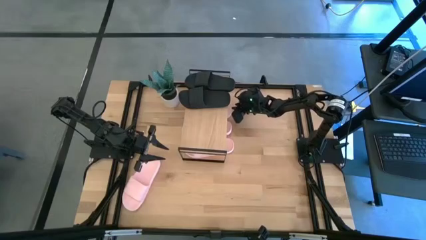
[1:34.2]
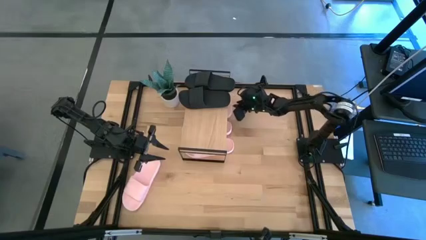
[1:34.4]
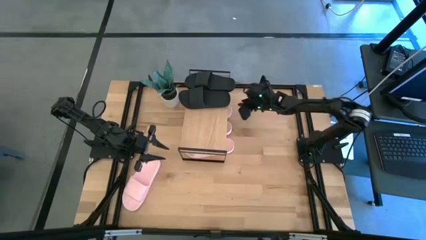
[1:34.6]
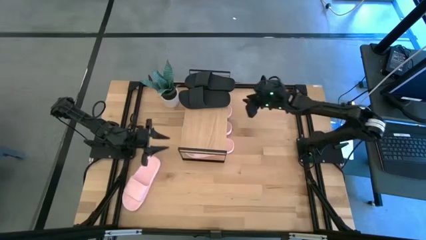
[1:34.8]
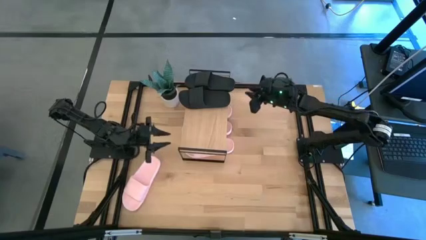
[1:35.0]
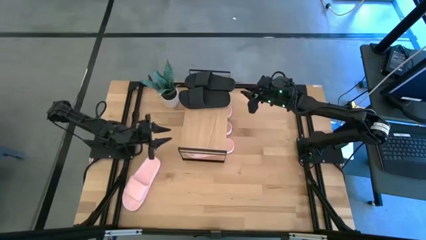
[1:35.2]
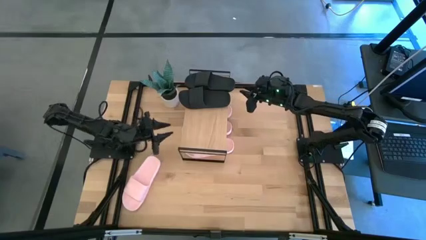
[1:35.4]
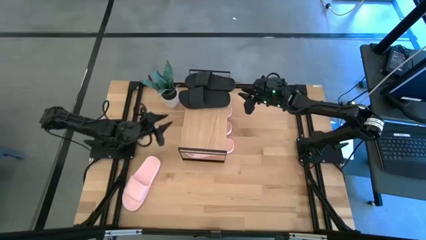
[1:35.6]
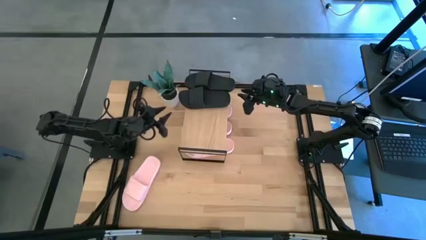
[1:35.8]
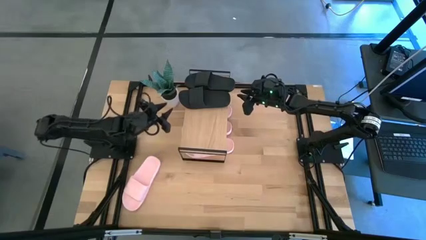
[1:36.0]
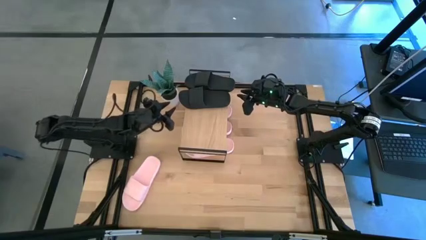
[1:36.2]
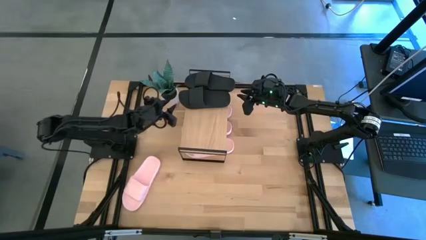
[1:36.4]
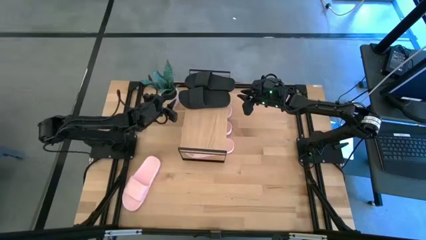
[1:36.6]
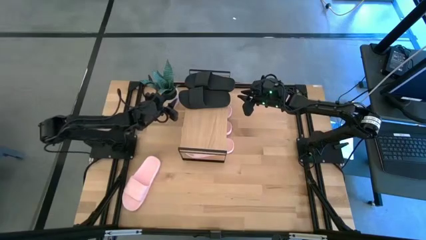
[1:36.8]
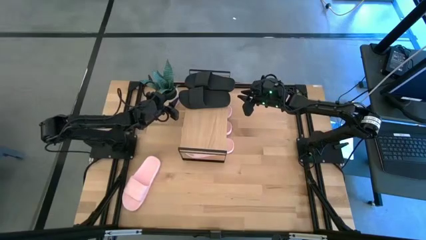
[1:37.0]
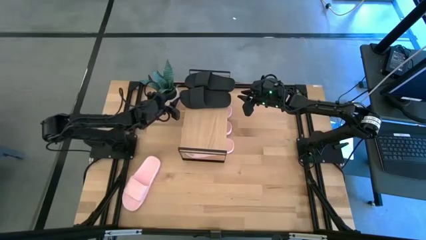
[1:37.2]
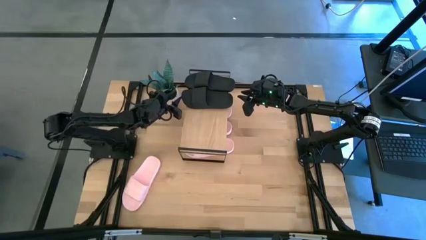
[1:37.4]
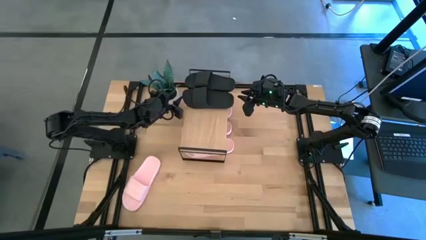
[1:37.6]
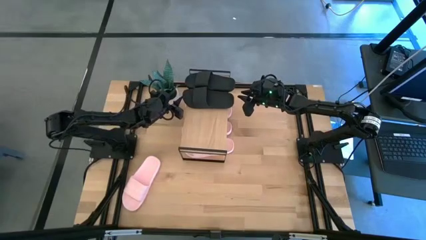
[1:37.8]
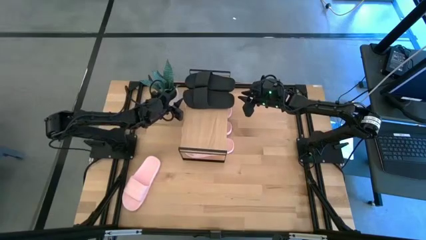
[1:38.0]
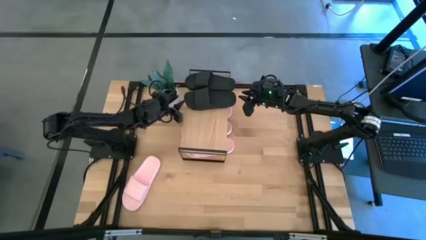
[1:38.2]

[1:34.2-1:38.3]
Task: Pick and place slides into the shelf
Adjust the black slide on the shelf

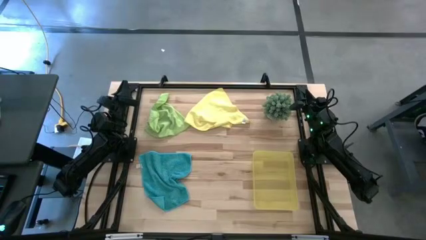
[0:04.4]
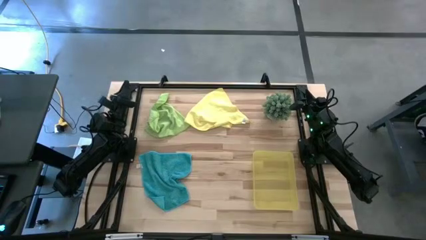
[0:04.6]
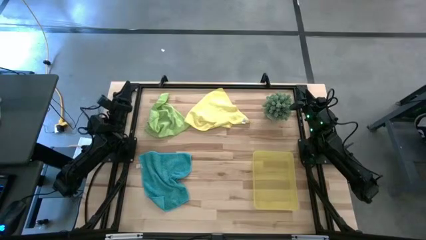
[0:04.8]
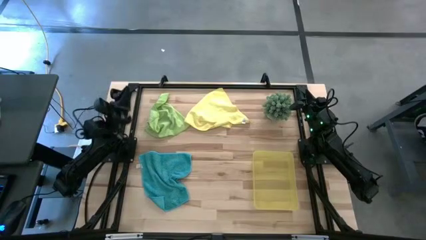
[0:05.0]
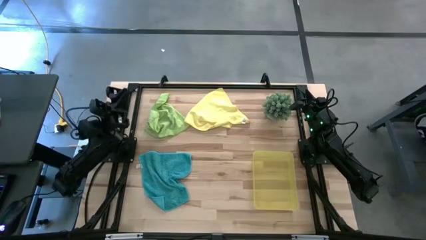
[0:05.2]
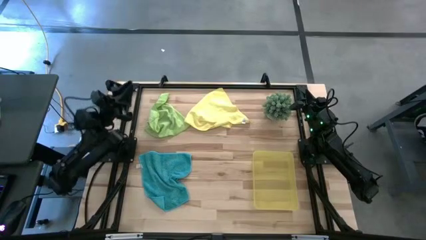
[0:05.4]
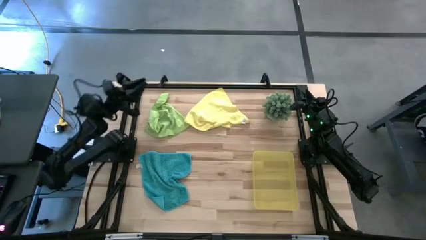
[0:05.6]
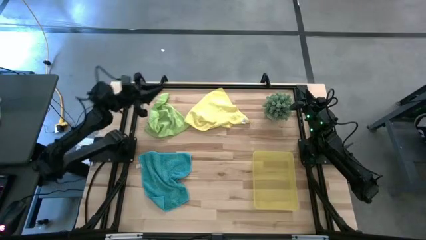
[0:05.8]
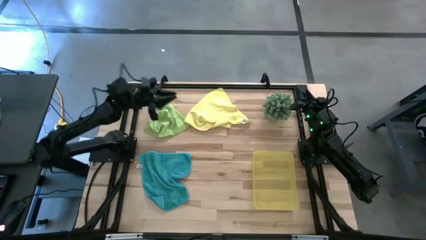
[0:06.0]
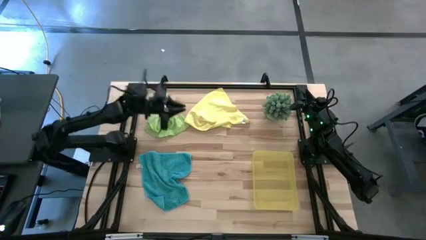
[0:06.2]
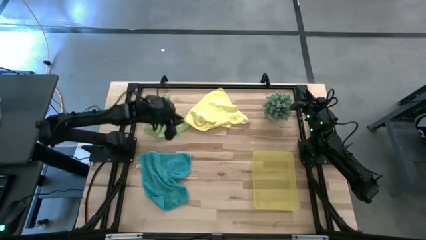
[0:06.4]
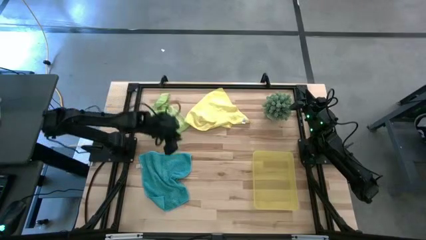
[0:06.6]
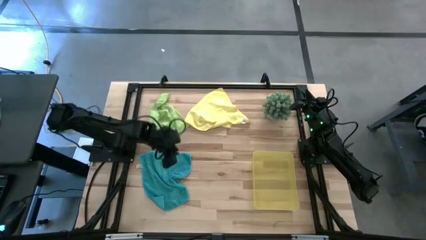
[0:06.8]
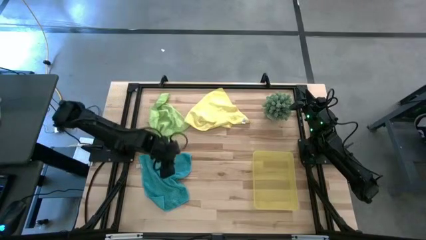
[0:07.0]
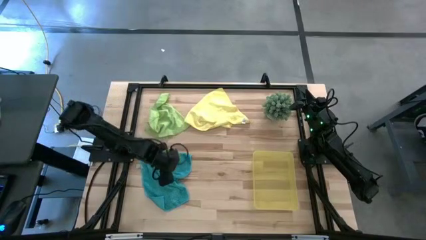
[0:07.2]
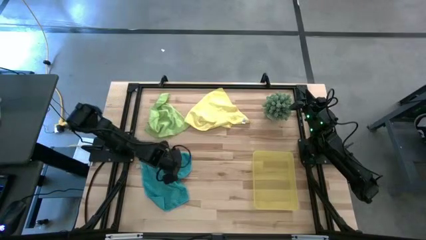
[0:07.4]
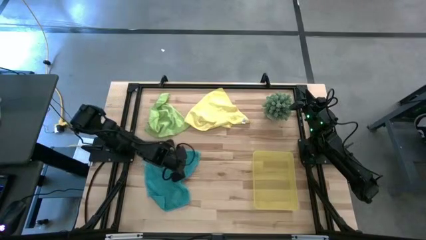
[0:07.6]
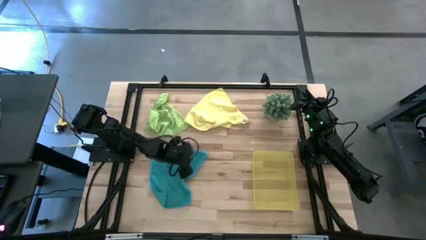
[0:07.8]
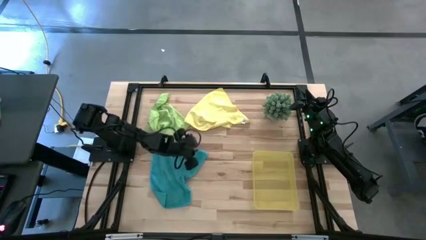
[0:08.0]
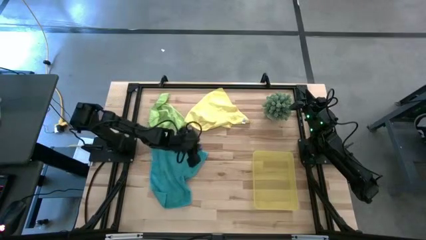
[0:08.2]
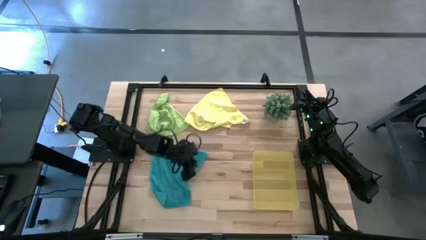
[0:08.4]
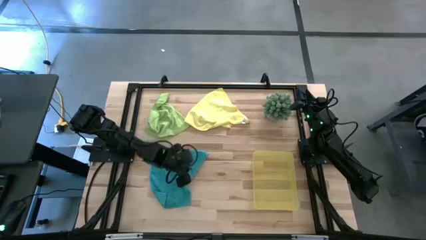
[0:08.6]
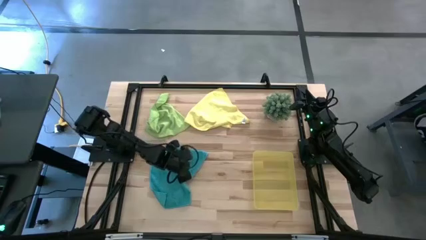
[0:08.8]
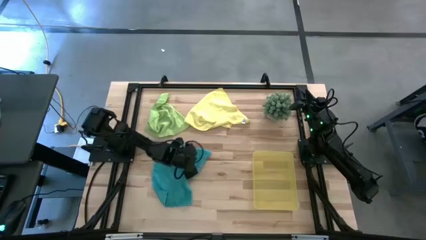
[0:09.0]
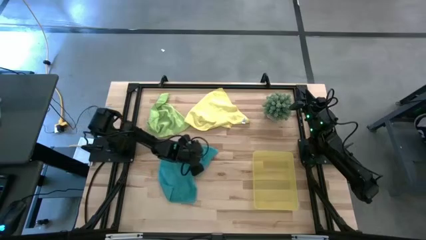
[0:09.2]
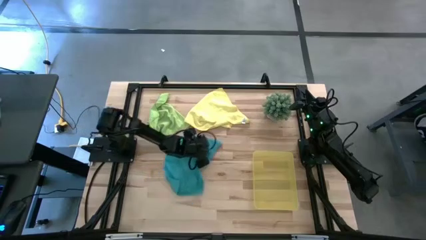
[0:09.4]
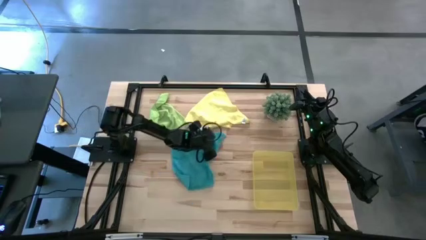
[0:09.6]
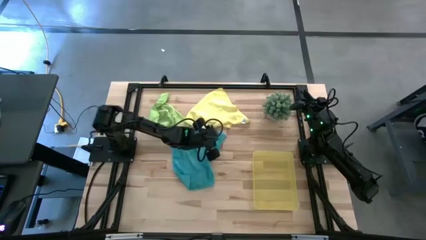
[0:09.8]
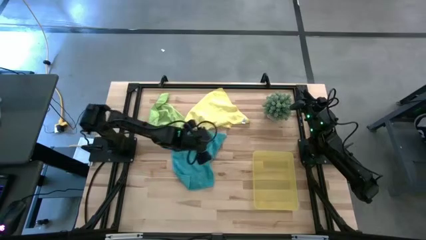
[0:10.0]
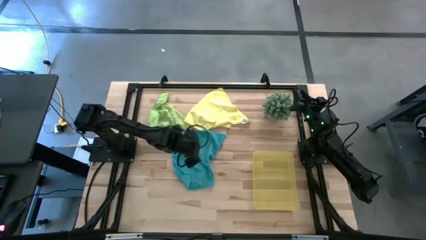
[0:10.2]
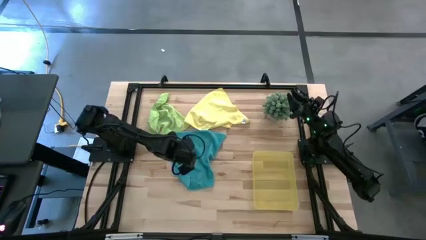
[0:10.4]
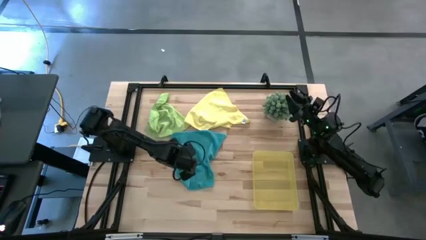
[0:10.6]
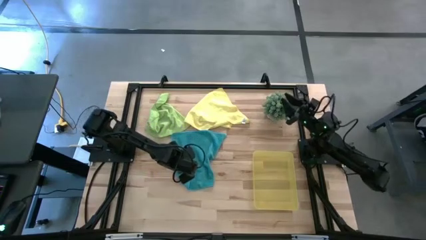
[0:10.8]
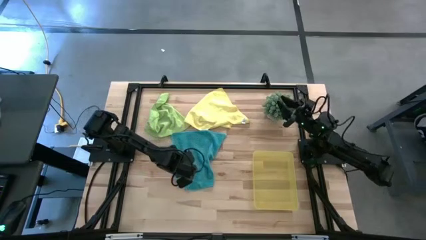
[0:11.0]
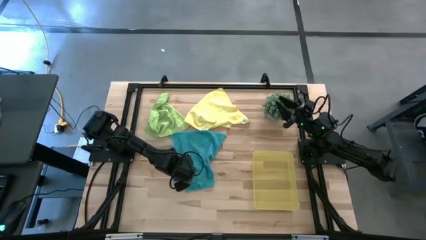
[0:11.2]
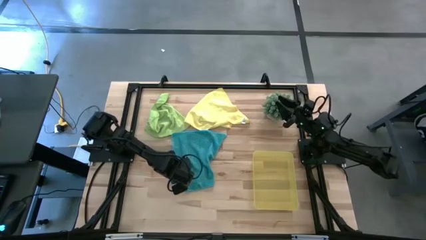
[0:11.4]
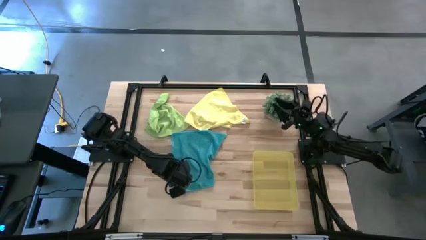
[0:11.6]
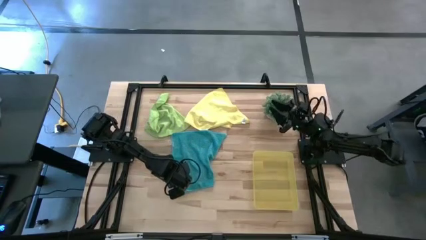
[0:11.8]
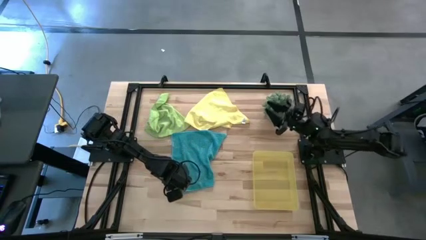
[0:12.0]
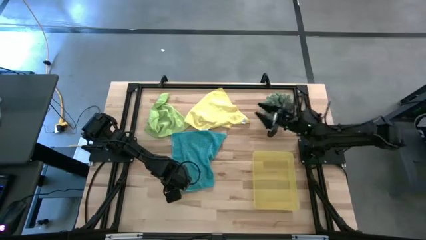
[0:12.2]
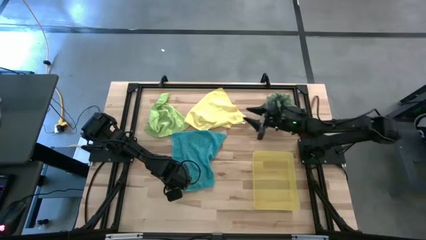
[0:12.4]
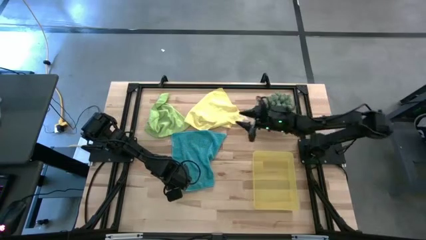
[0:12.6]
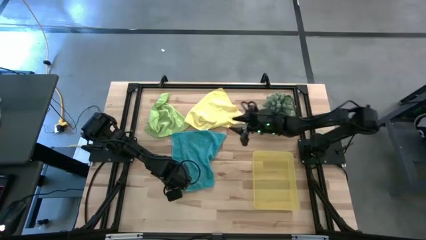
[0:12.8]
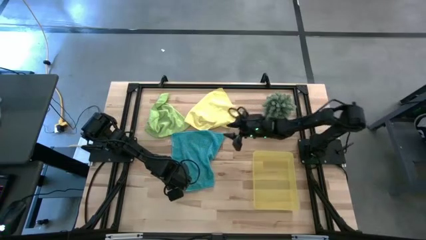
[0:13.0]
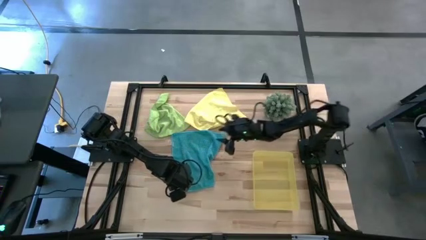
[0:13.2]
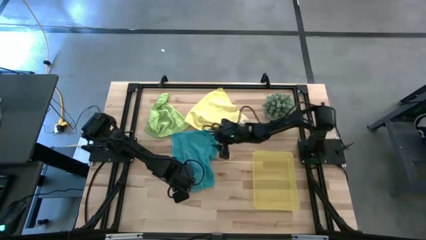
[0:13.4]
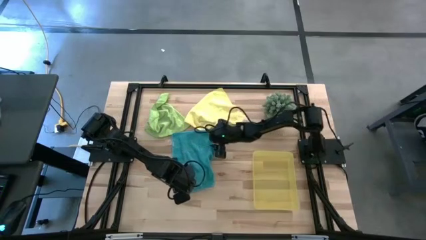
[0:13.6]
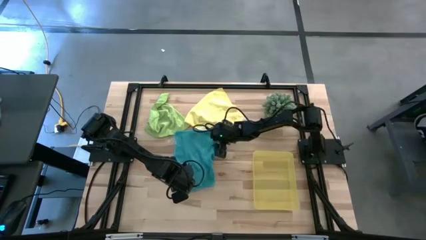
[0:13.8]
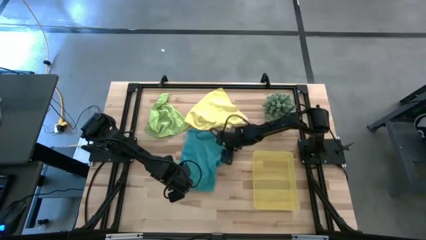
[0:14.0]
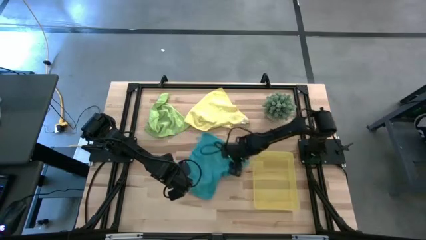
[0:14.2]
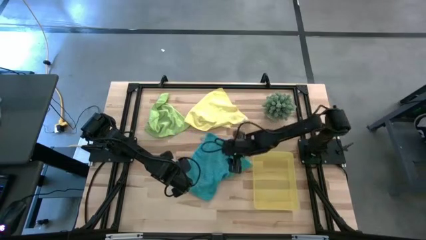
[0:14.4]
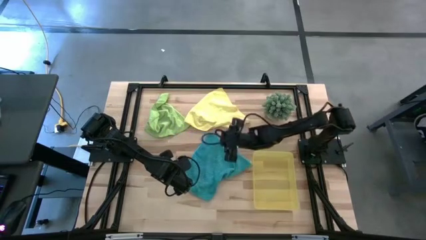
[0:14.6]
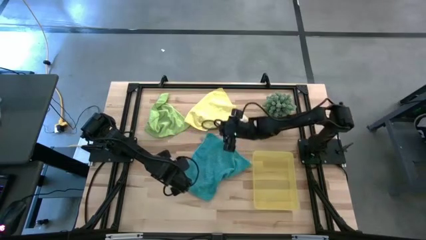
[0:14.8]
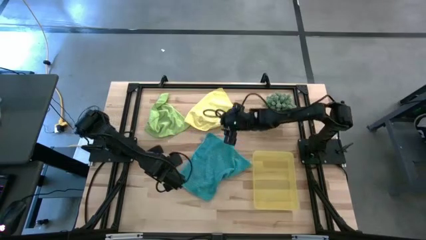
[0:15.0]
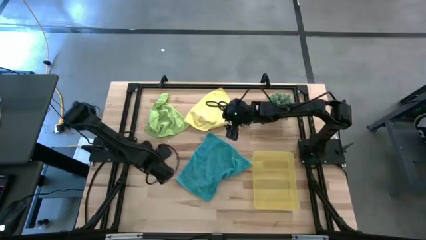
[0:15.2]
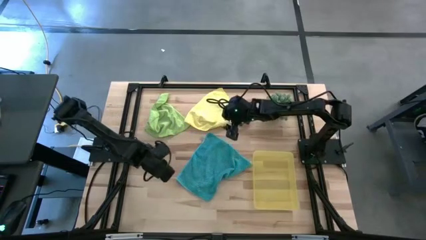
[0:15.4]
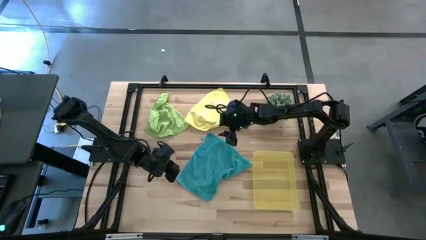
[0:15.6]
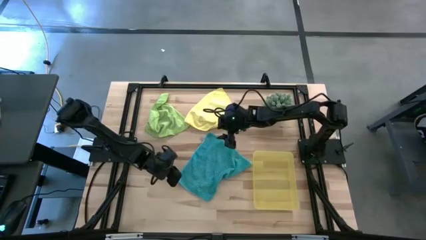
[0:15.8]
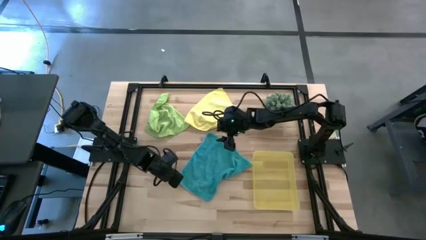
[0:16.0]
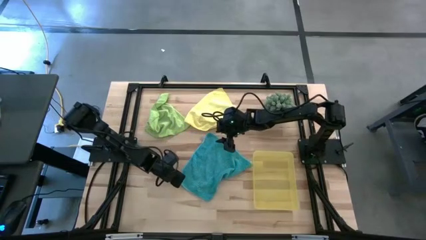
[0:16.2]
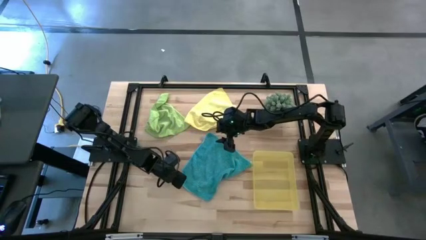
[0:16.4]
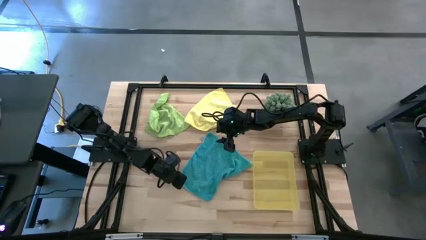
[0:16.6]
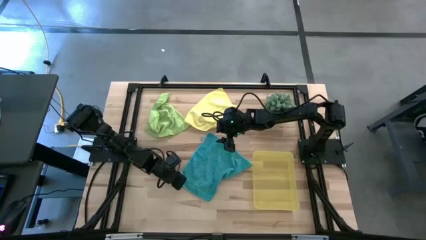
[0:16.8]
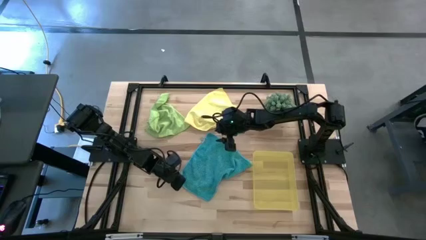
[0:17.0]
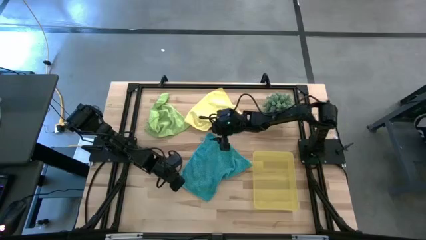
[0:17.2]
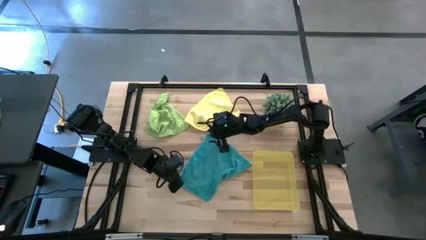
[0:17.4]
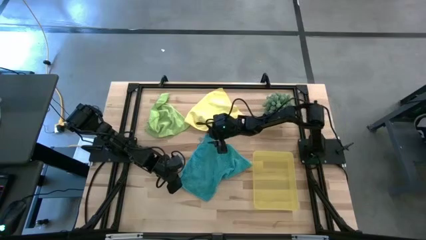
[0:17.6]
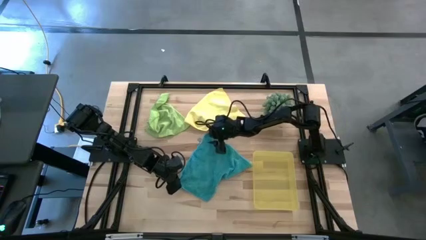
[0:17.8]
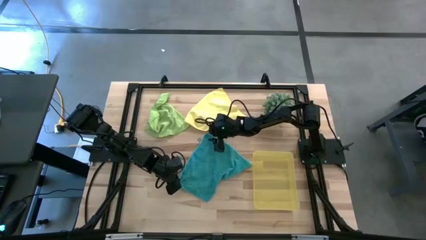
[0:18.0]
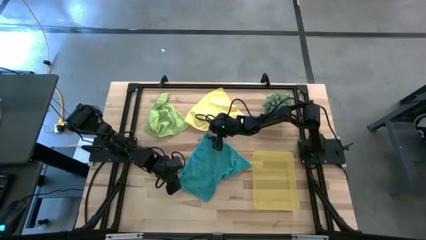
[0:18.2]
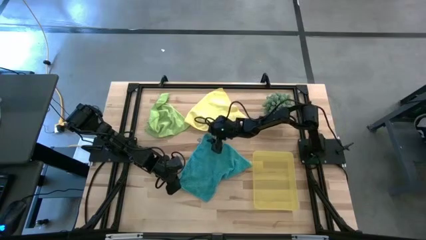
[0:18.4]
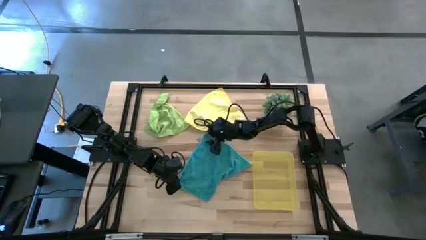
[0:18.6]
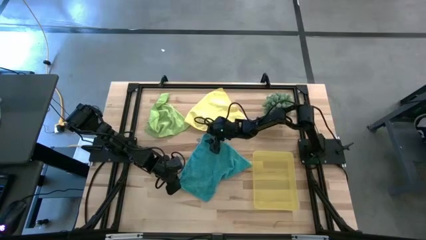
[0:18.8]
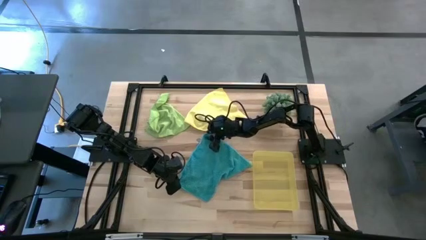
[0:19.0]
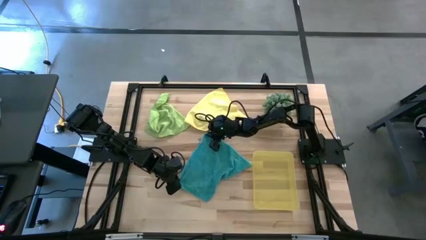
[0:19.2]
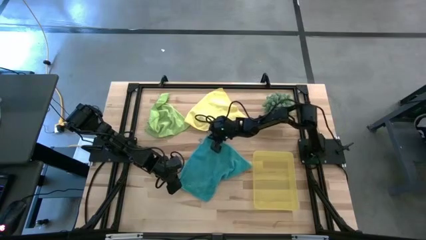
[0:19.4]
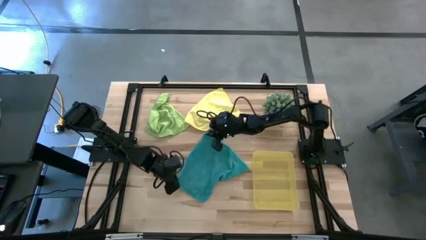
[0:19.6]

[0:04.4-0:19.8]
Task: Roll microfiber towels into tight, uniform cylinder then place into a basket
Fold the blue microfiber cloth
